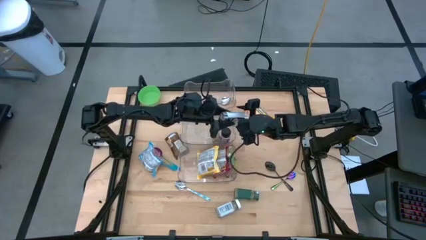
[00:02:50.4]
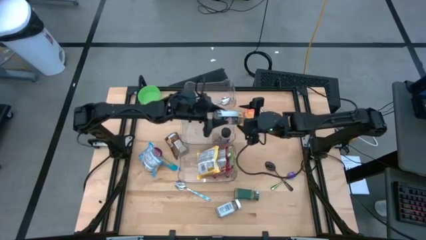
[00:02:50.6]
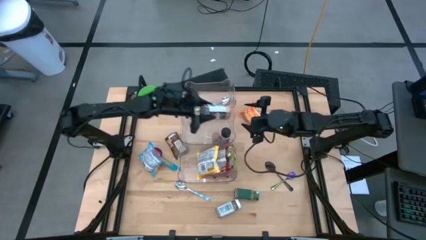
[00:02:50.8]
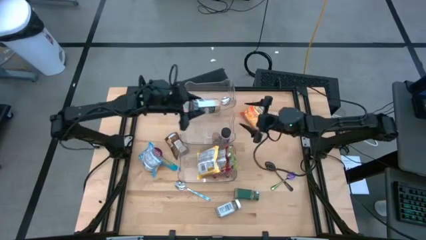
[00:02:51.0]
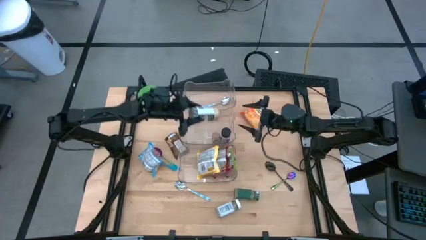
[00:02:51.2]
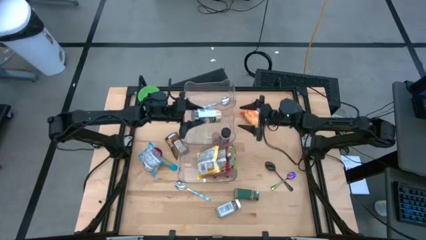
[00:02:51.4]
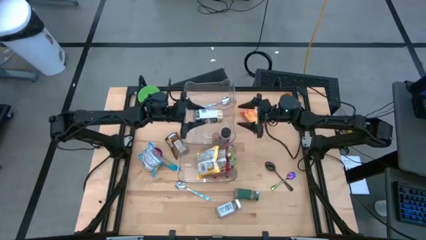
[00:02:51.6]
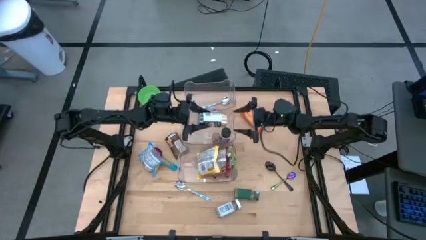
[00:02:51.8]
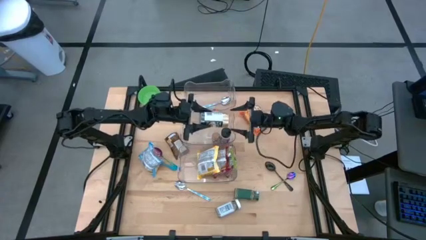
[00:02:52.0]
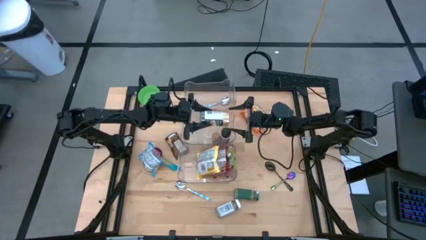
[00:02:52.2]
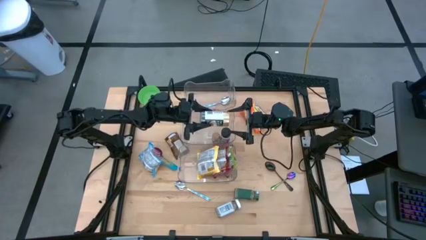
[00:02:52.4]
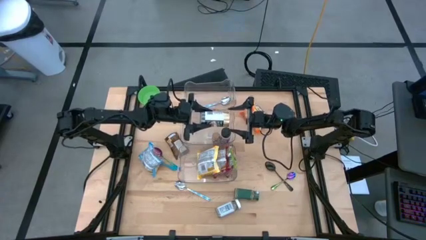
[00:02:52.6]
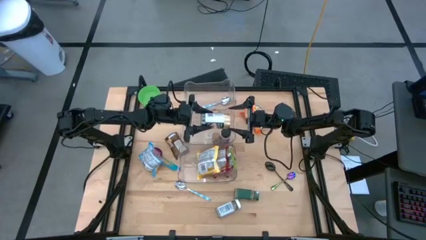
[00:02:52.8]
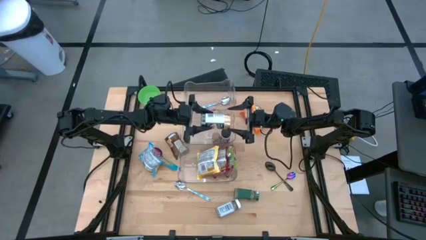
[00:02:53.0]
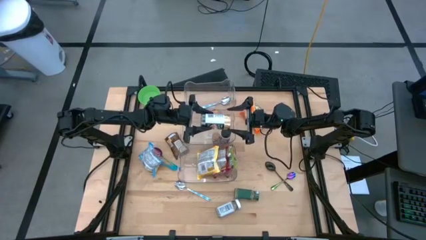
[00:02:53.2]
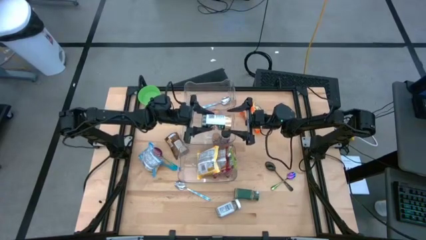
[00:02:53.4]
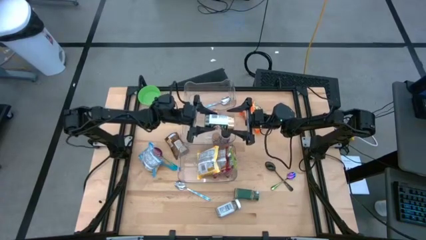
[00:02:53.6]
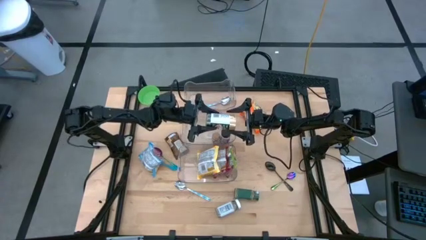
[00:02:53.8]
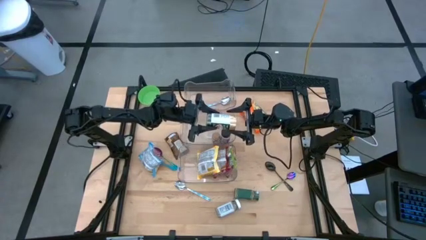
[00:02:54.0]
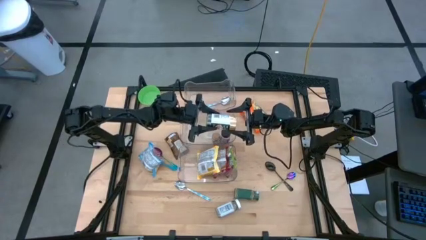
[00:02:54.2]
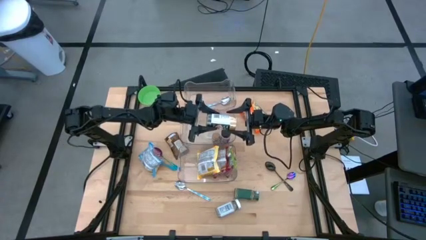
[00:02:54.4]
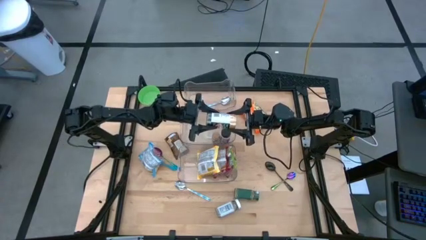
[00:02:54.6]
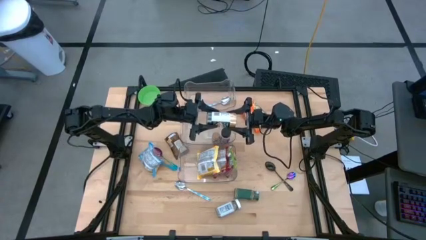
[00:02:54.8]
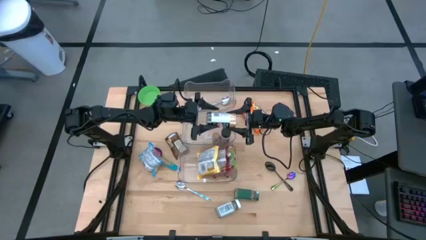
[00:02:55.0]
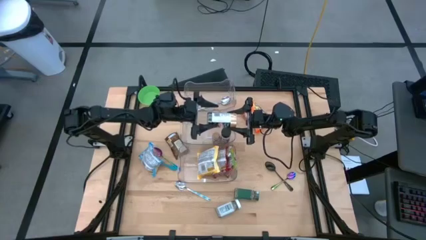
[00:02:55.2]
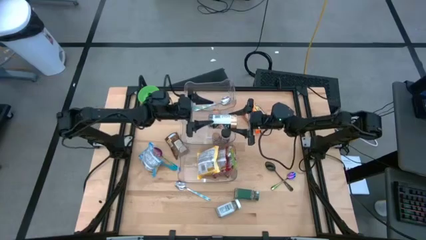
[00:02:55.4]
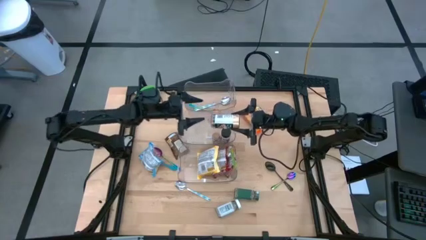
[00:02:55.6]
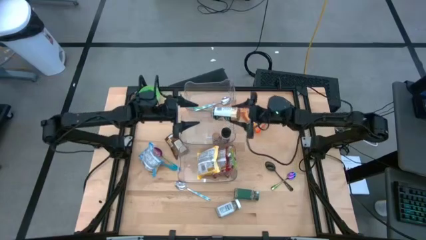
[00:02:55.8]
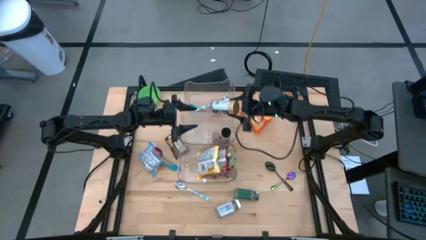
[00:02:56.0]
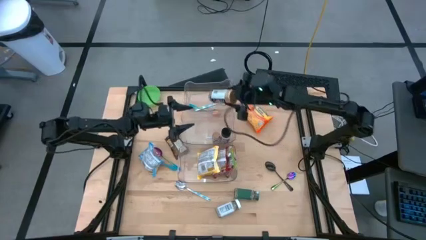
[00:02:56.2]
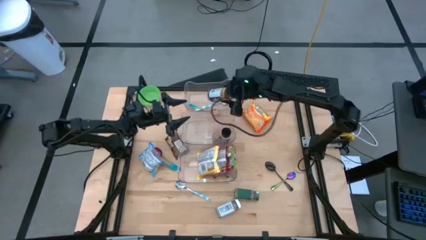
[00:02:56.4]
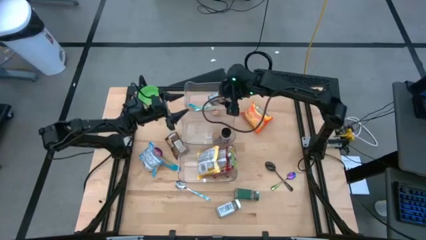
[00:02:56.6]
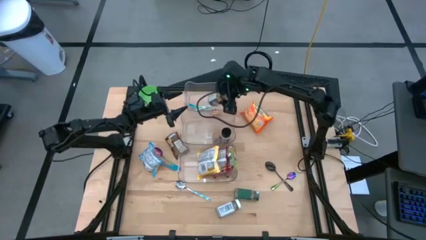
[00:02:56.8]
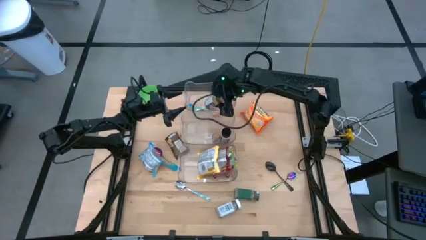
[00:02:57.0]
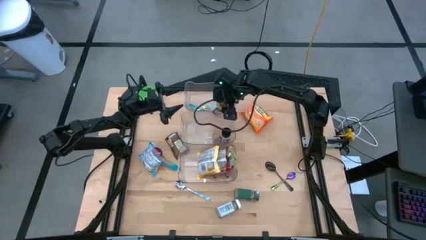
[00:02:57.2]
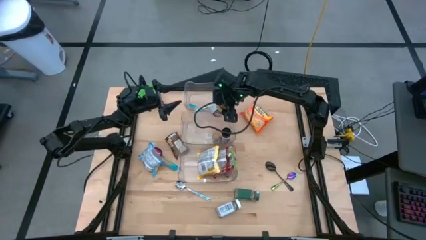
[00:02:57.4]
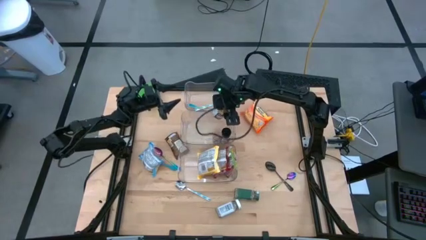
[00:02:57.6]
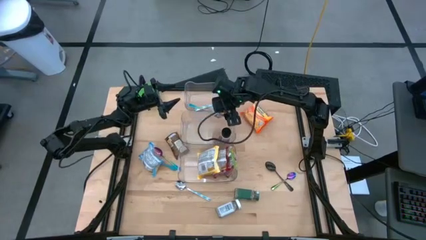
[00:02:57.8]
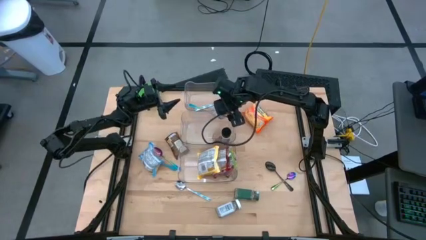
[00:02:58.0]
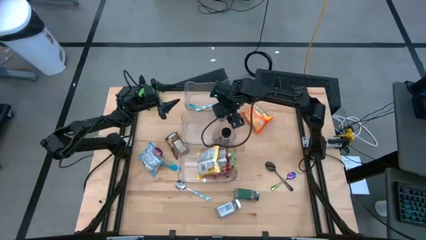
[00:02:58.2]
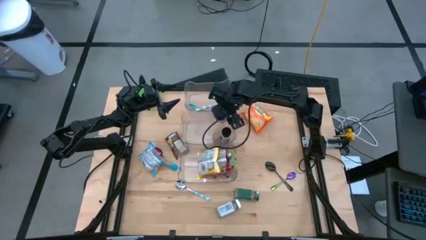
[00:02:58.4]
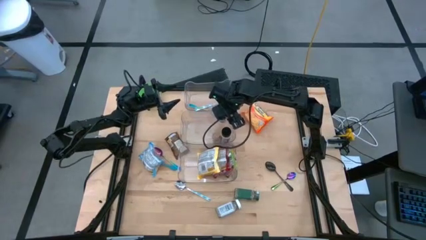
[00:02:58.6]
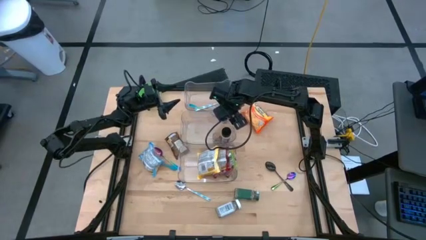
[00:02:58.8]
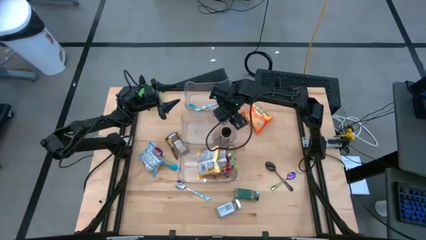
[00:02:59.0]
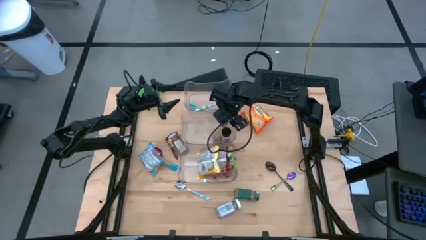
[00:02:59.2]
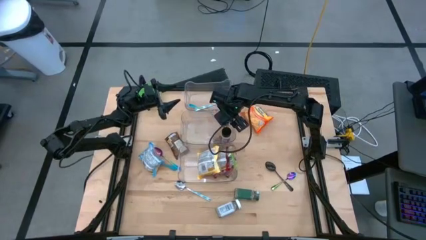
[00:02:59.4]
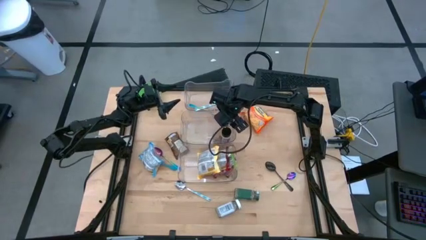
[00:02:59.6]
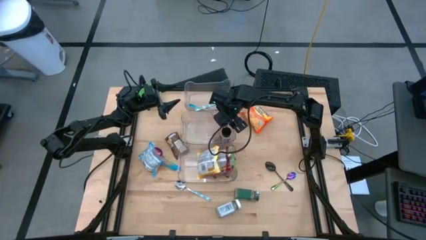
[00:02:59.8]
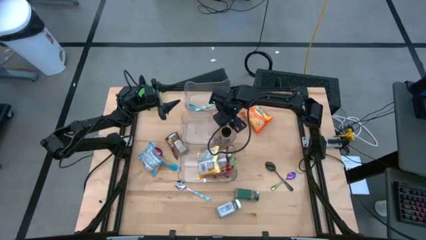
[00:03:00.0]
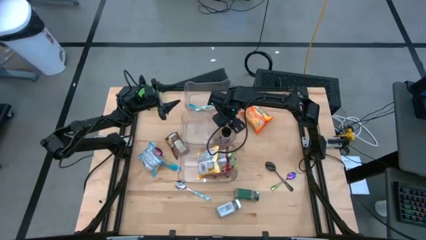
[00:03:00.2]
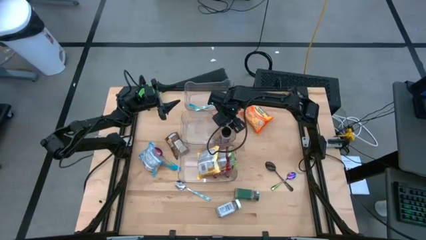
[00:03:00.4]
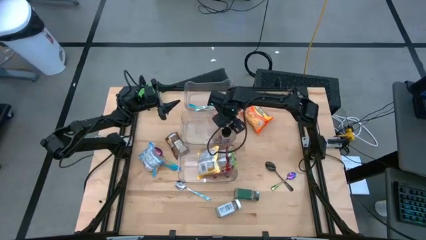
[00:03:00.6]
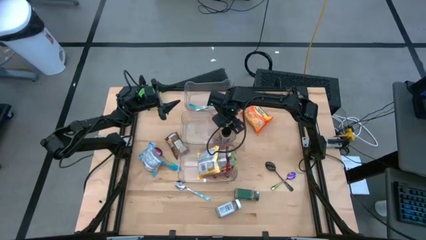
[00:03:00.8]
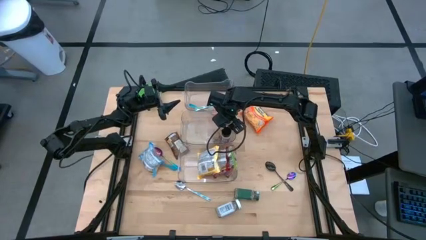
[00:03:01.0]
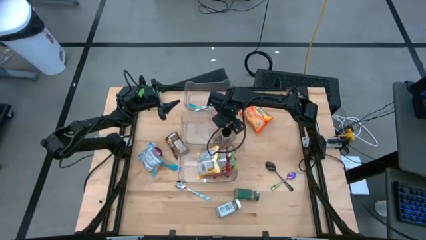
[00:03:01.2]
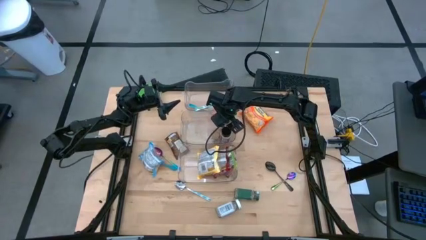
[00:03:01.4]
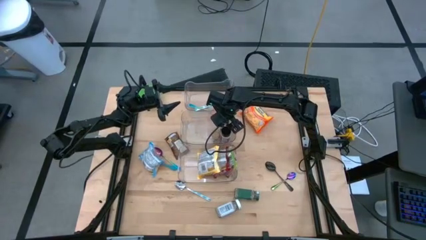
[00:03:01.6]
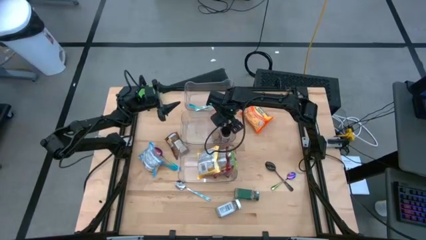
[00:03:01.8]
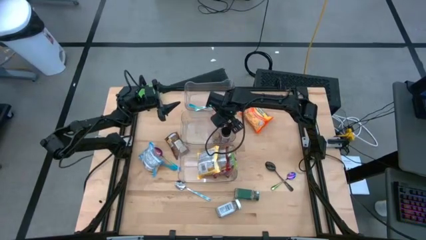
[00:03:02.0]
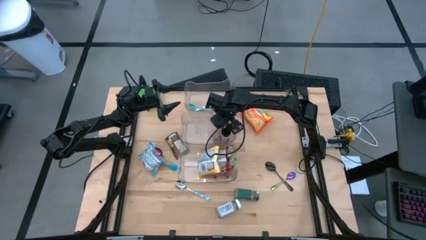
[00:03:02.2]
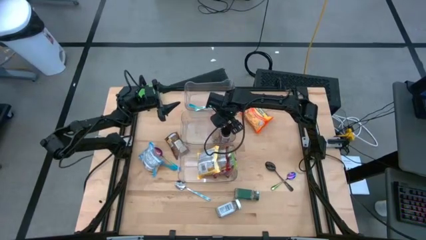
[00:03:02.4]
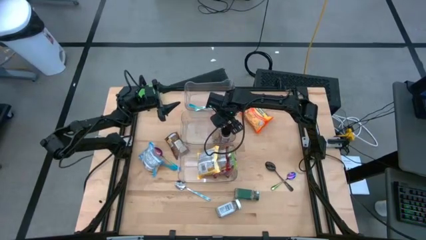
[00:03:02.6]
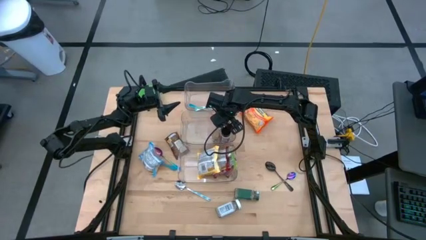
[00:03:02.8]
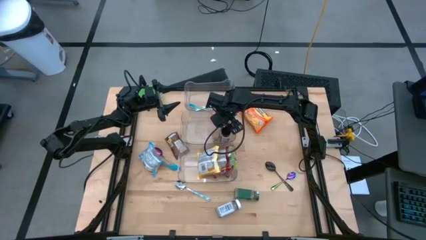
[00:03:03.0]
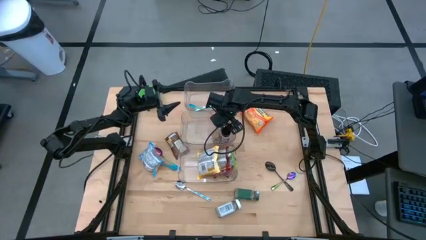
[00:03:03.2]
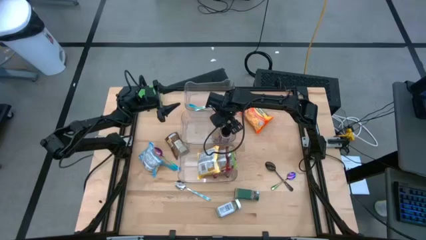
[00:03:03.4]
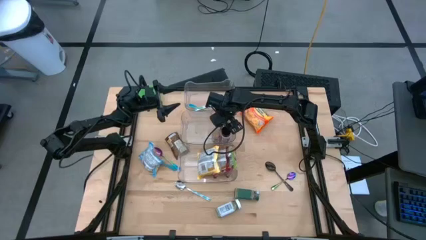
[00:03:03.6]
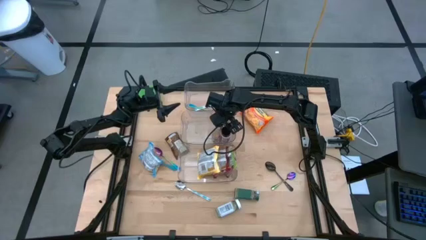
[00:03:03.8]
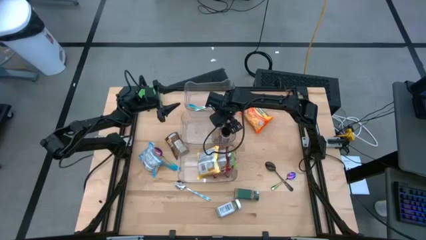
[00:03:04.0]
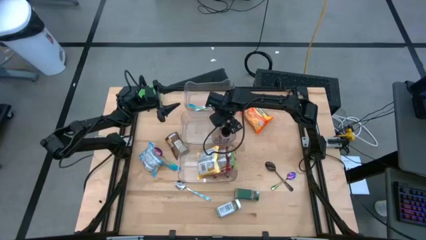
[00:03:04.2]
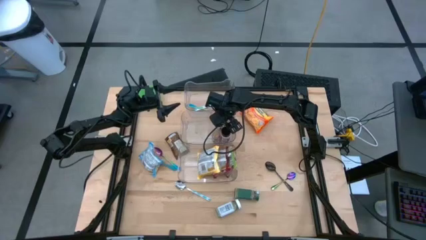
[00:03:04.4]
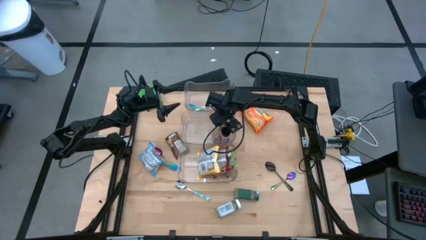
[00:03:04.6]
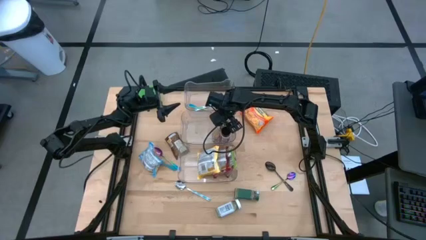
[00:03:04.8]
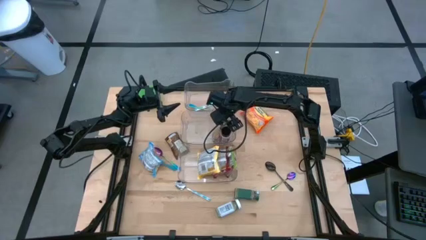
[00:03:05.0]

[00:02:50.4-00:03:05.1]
Task: Pick & Place Food Item
Put the gold seasoning bottle into the middle transparent bin

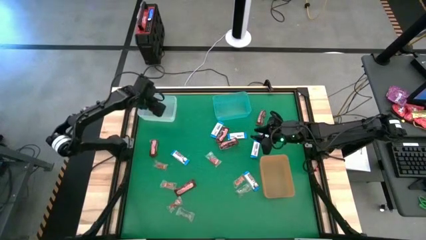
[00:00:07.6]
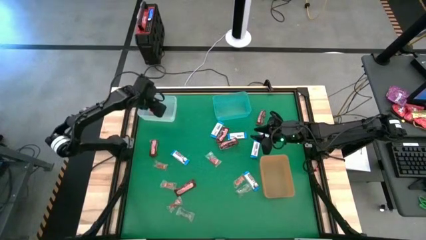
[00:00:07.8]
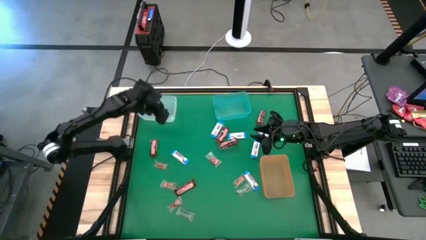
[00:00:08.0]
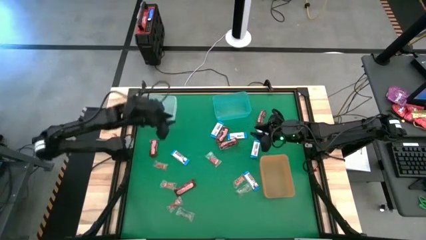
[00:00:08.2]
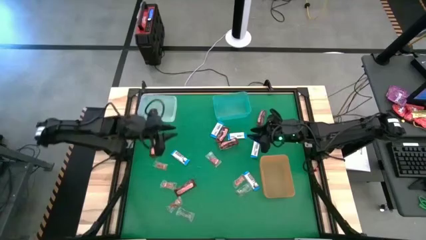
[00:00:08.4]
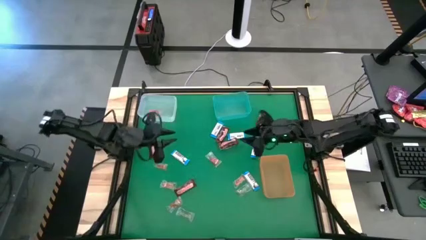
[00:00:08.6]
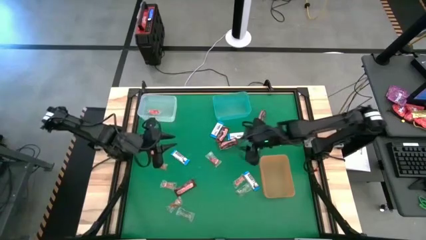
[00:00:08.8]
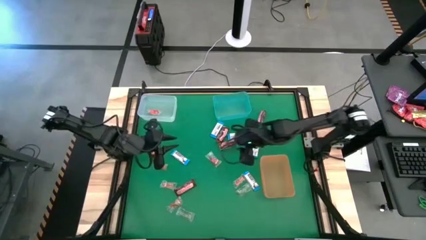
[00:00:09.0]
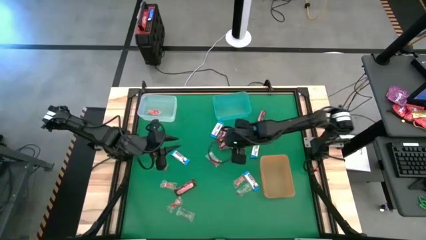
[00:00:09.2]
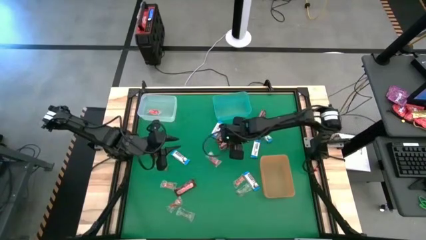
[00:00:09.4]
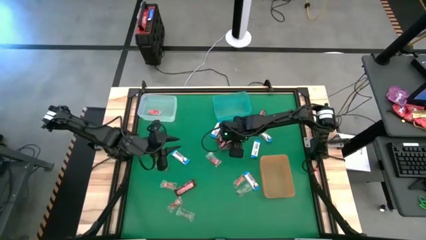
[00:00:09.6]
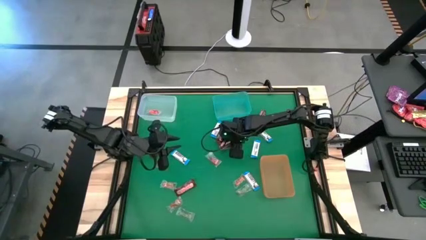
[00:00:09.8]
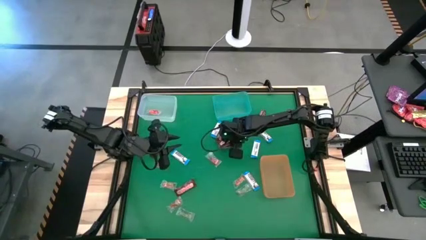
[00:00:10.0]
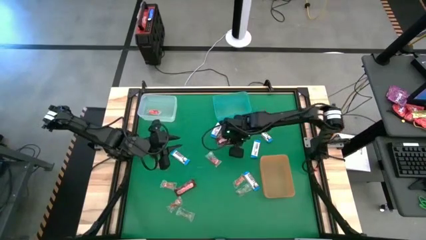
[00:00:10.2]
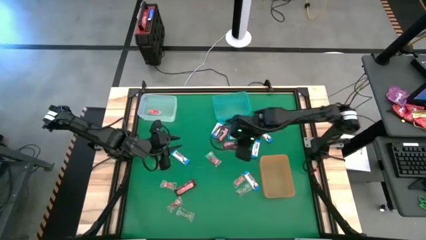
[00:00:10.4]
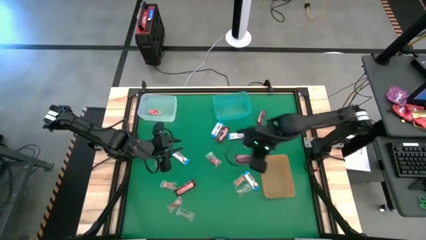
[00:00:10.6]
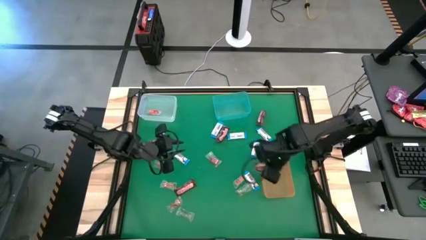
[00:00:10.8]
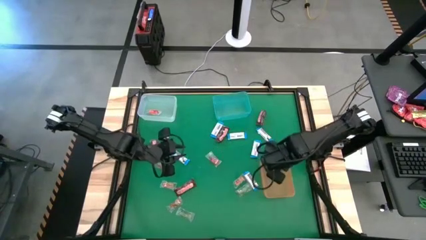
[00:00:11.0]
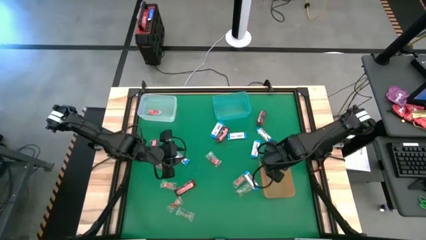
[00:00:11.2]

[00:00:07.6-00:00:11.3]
Task: Sort candy by brand, put in halloween buckets
Put the brown chocolate into the orange bin
